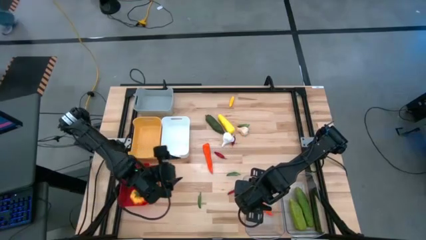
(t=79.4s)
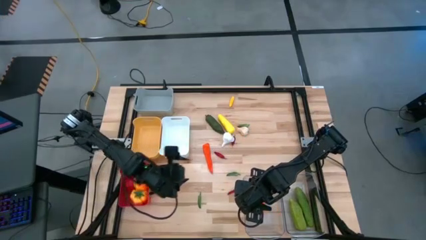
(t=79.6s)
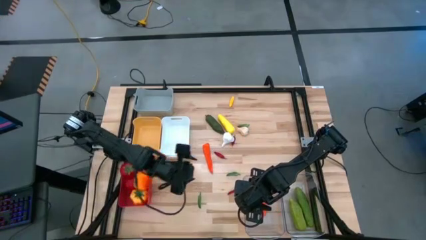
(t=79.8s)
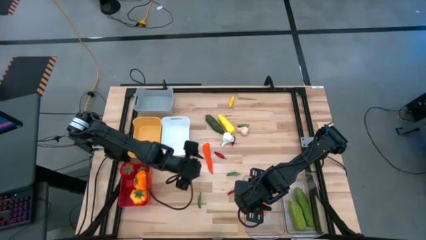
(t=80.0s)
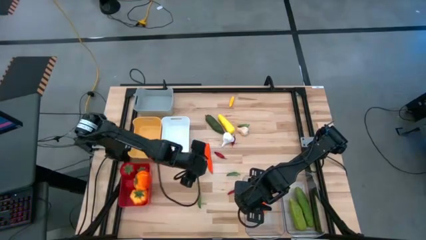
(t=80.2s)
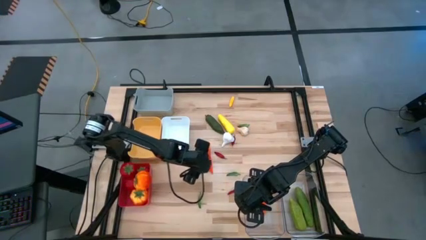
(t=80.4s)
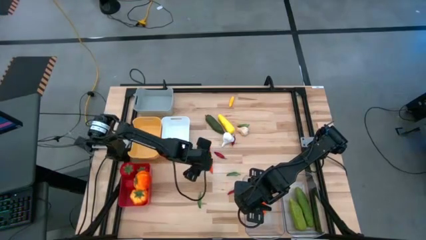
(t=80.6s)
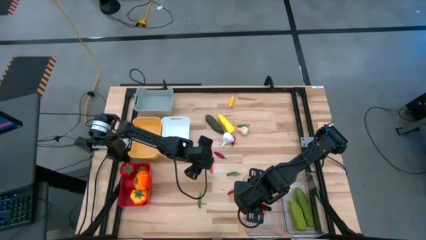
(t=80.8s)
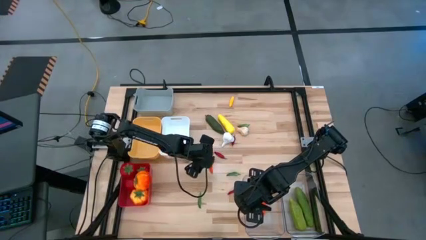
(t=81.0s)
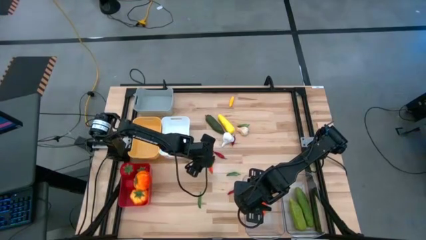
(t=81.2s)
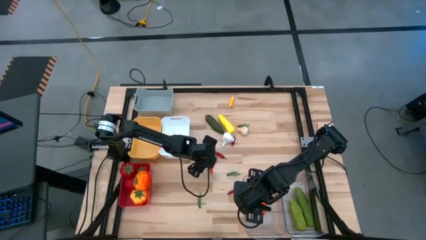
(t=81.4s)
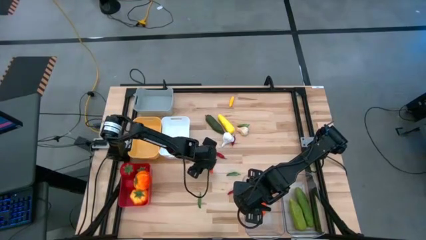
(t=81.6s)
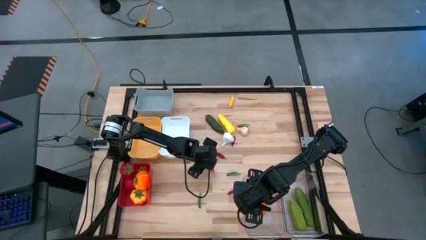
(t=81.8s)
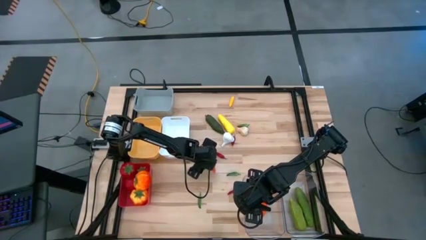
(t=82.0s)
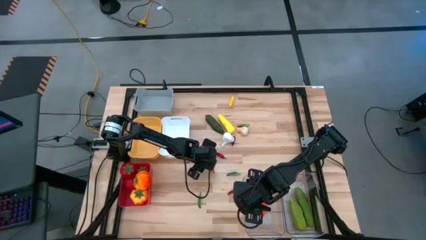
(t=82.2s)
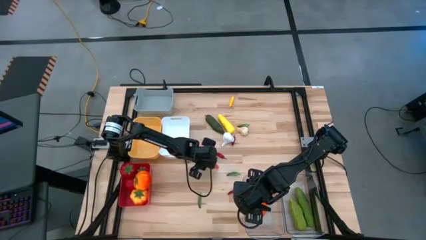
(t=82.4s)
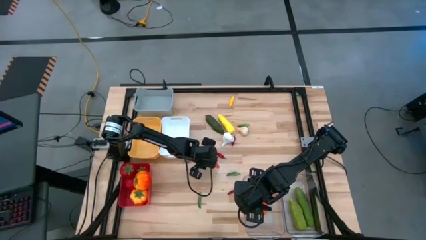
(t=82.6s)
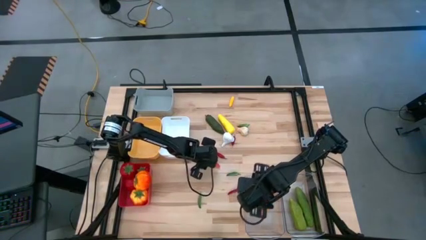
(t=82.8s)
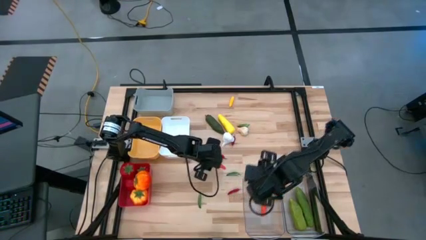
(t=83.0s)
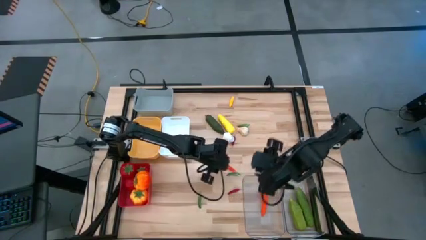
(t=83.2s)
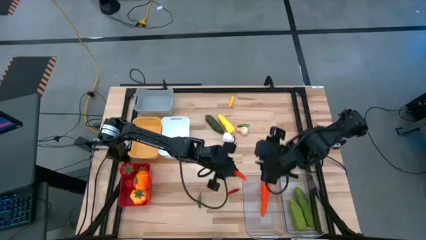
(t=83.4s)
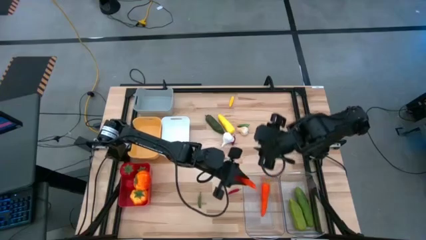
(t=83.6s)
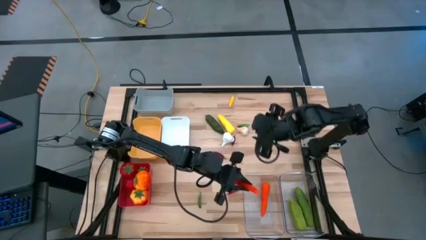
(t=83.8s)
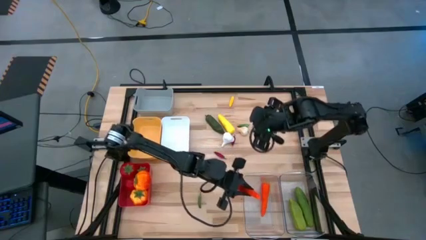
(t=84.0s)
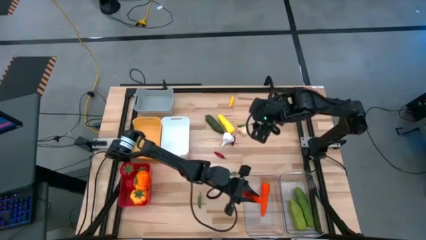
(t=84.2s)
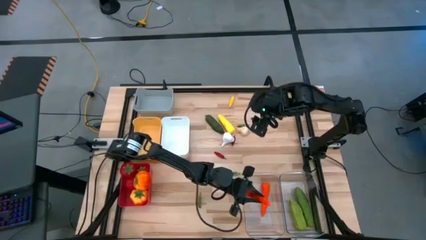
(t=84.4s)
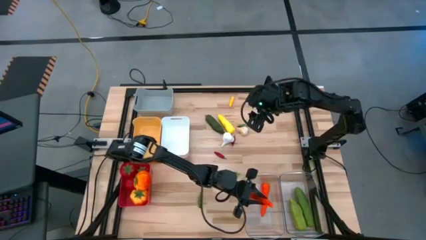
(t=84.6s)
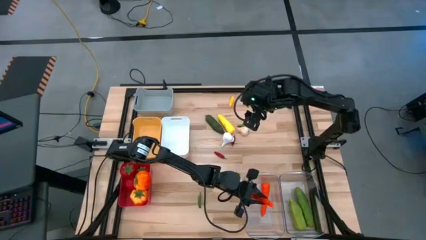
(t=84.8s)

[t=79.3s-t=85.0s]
Task: Sort produce into baskets
Put the orange carrot into the left transparent bin

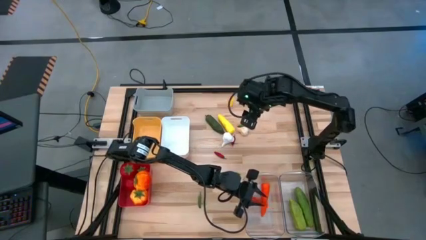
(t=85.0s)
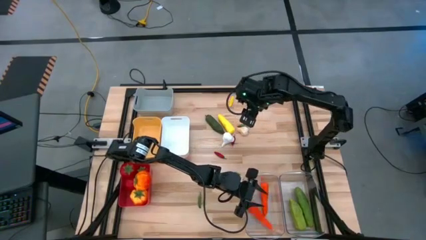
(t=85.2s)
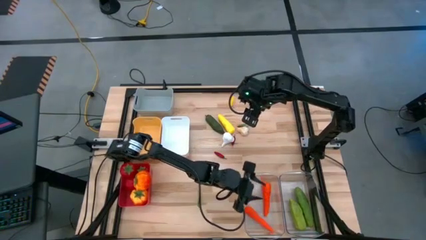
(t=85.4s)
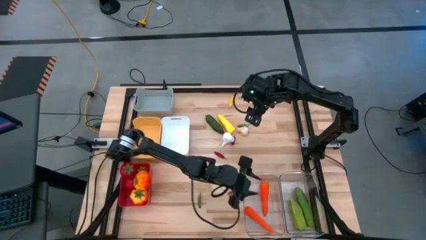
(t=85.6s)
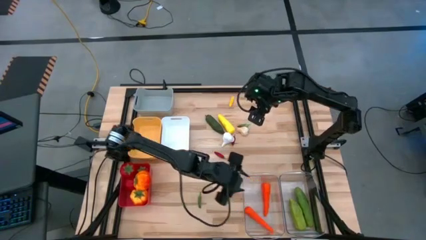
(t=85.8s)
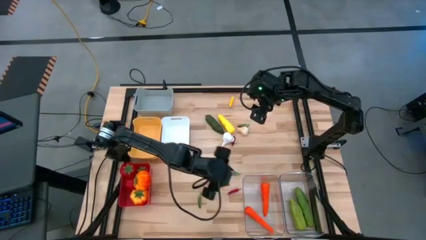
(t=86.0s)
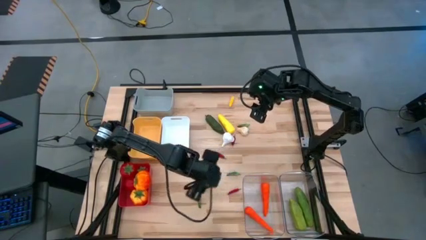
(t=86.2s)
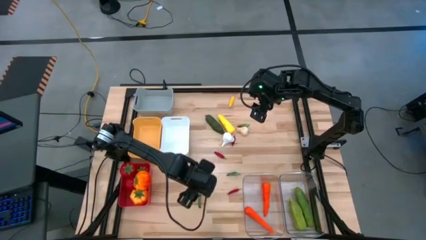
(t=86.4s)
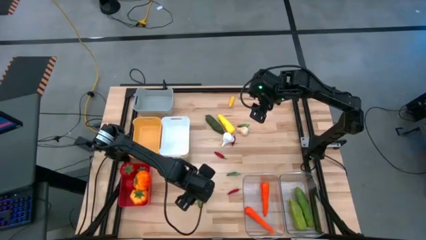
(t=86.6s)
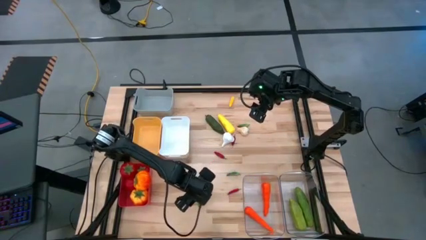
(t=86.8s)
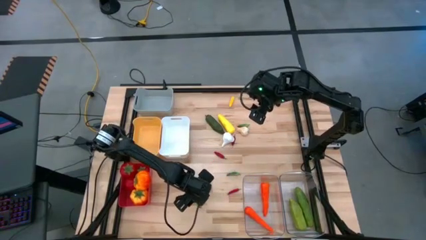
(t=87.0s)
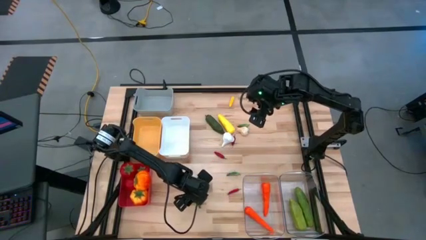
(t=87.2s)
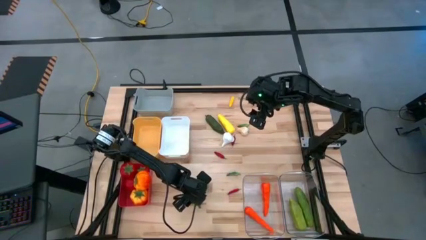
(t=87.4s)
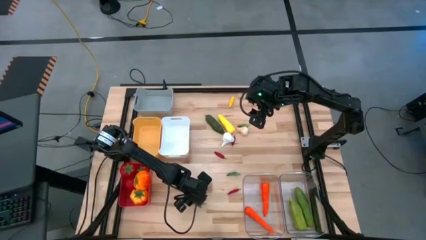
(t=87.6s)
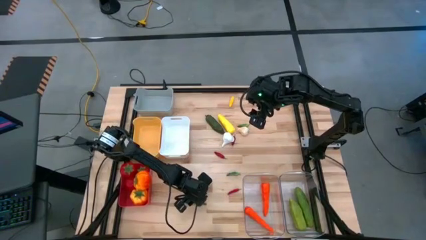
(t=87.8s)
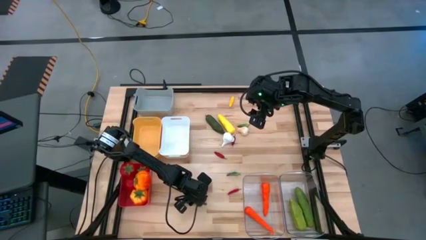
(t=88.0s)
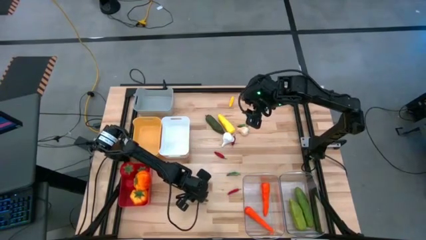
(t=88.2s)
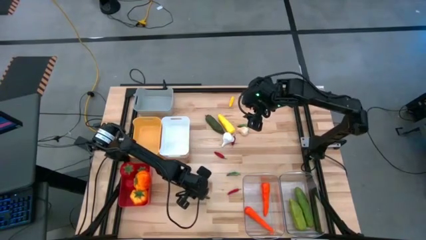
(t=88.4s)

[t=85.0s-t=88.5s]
Put the left green chili pepper into the white bin

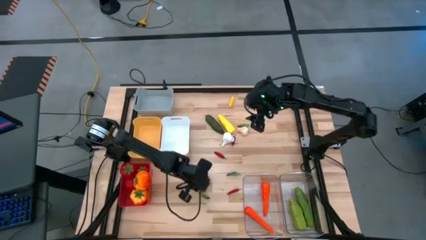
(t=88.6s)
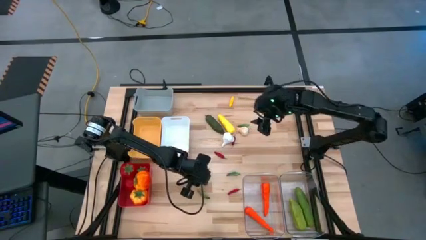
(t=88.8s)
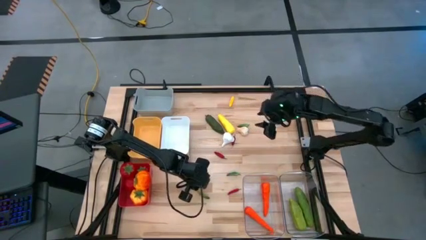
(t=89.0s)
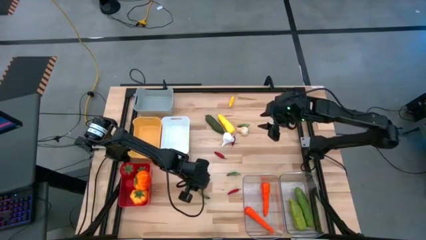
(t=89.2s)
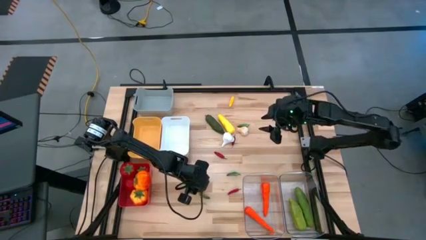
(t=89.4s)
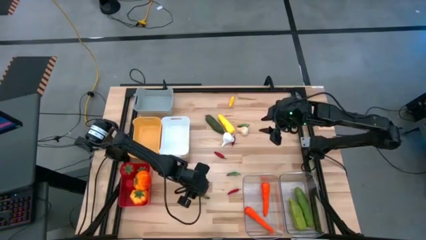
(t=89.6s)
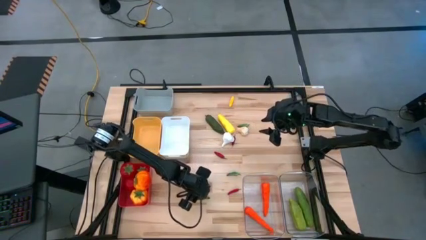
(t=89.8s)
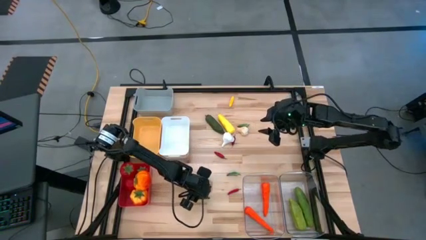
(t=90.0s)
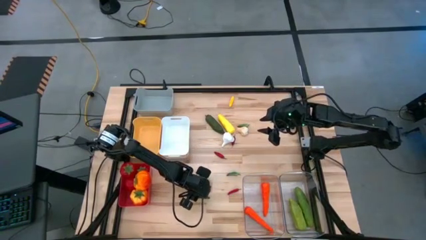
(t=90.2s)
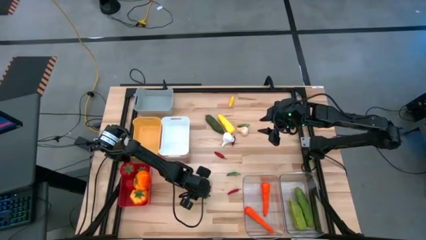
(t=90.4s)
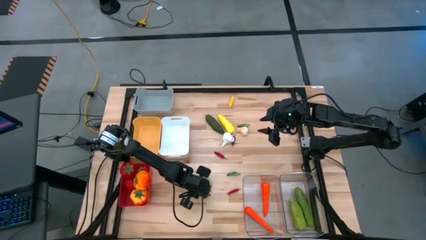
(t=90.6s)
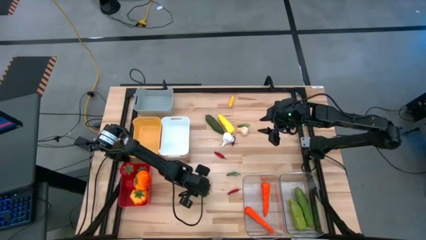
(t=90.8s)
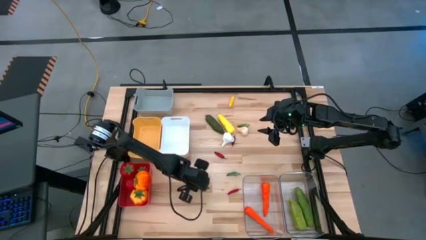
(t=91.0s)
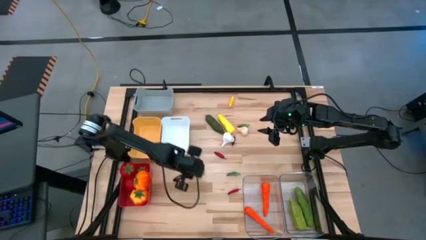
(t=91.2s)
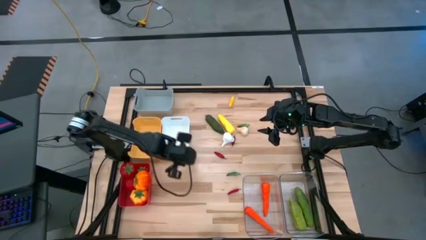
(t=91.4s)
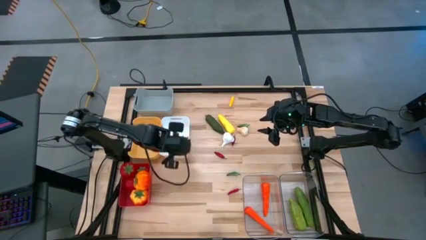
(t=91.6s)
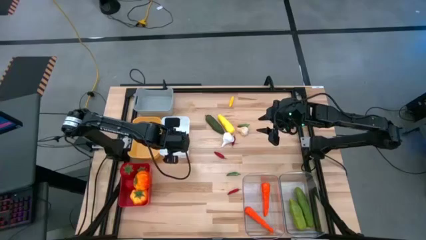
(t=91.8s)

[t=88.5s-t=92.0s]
Put the bottom green chili pepper into the white bin

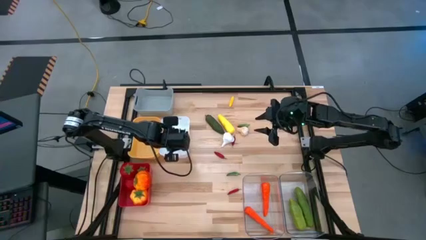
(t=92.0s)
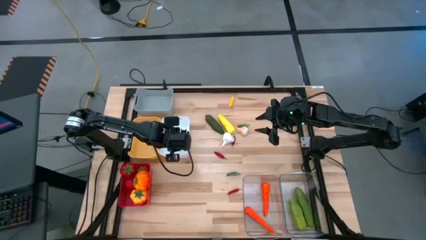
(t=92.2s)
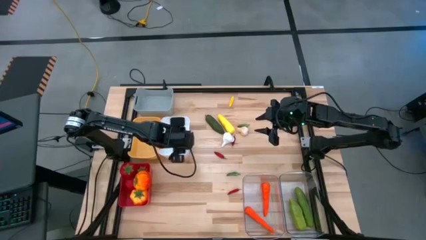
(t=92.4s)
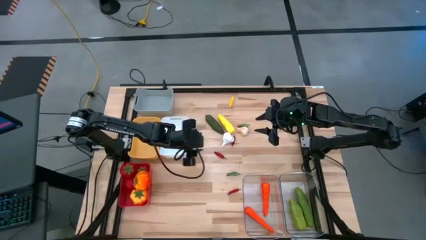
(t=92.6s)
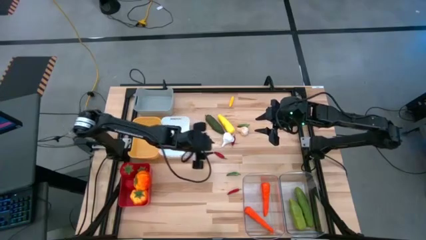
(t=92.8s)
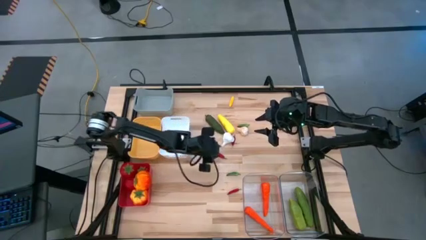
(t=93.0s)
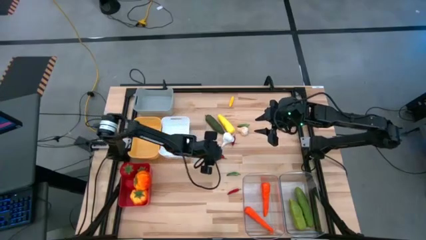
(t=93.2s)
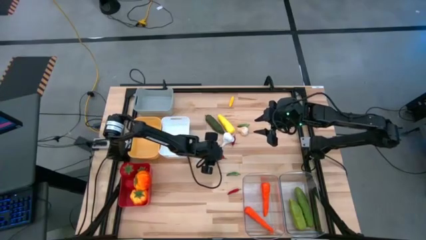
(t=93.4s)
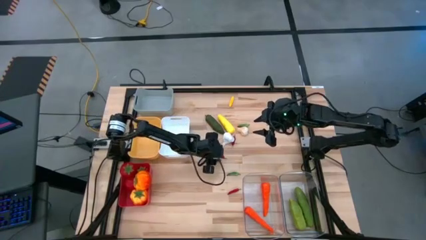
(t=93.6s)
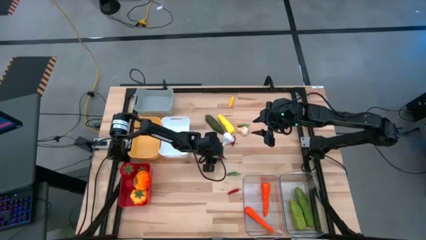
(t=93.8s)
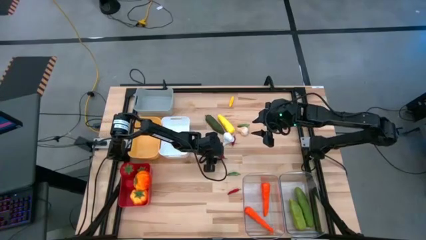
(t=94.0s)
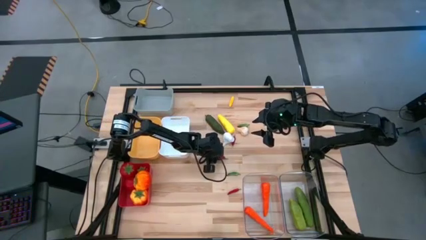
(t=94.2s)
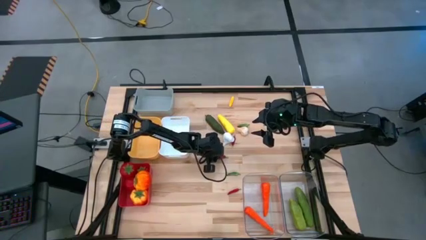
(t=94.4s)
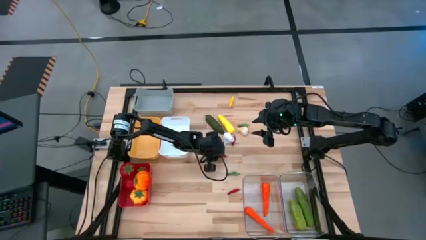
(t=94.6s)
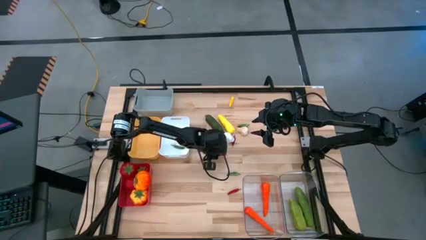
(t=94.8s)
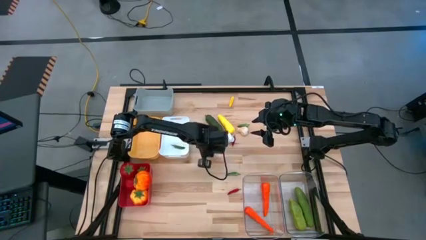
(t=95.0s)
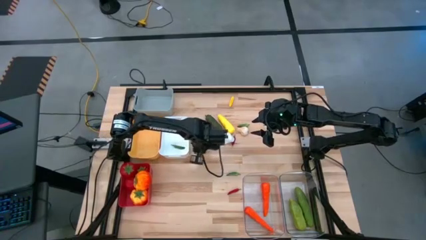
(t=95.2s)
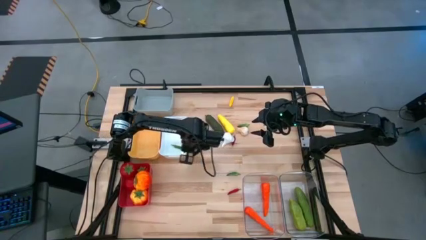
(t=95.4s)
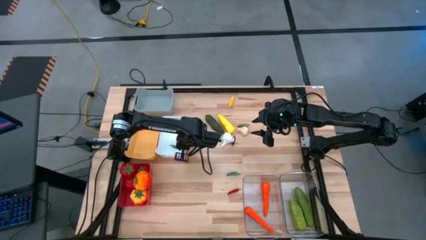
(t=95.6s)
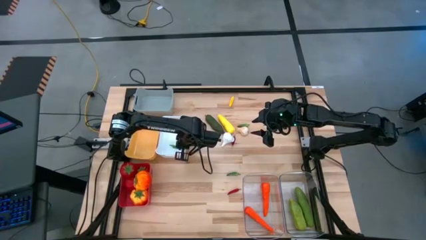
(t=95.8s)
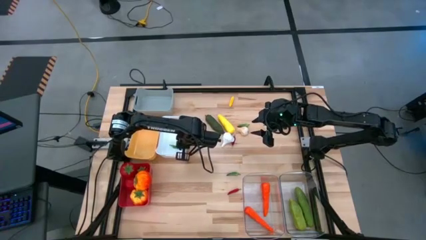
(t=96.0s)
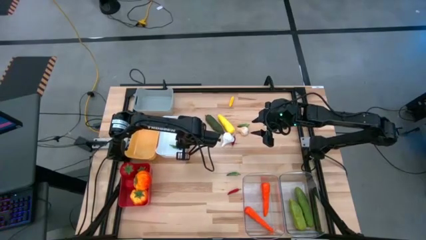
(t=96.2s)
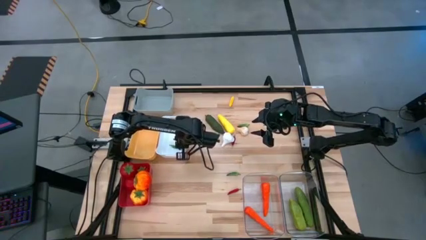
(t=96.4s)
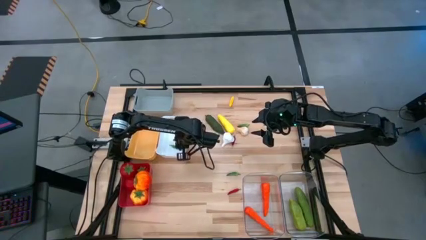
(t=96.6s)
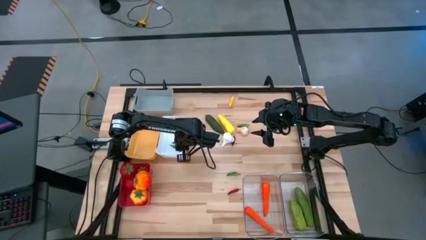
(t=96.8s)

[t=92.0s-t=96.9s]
Put the middle red chili pepper into the white bin
